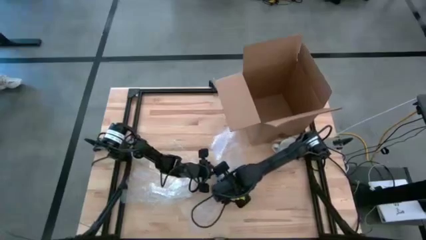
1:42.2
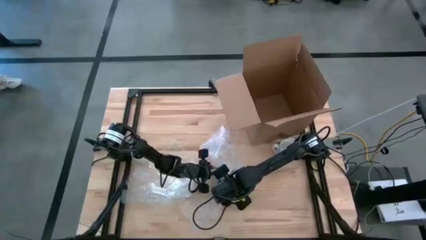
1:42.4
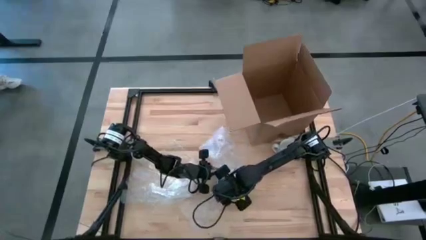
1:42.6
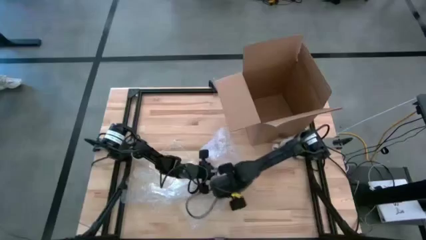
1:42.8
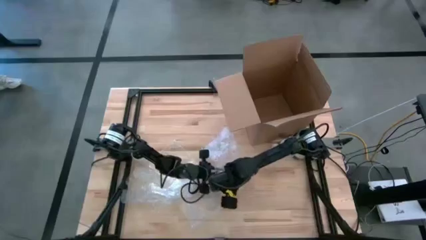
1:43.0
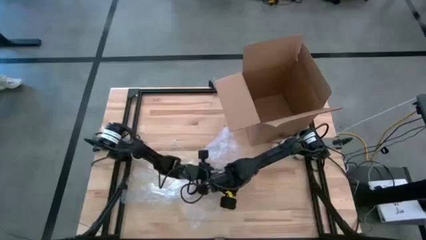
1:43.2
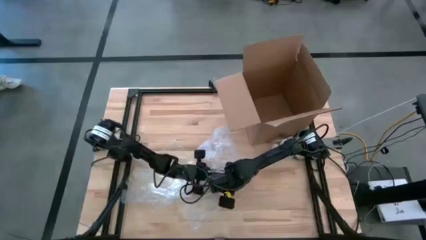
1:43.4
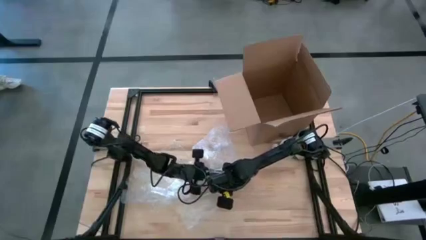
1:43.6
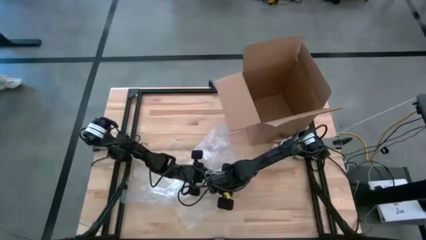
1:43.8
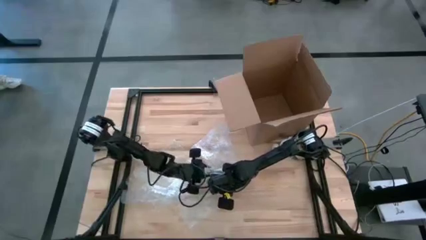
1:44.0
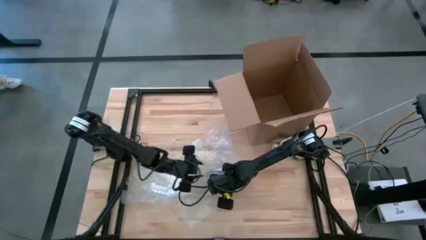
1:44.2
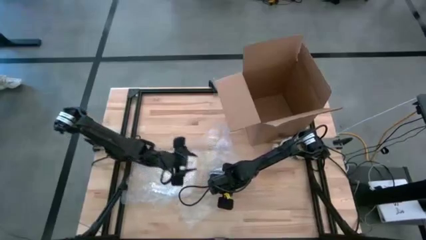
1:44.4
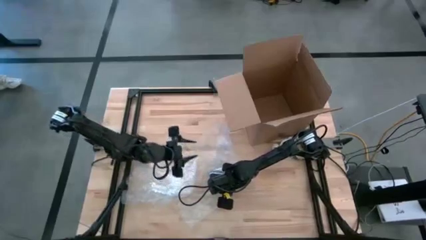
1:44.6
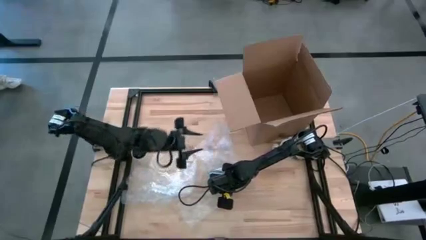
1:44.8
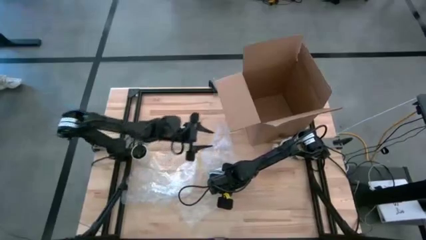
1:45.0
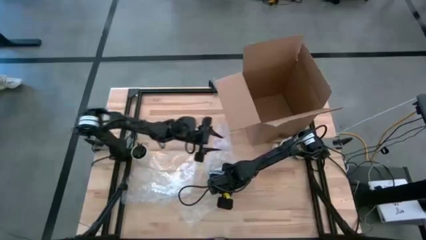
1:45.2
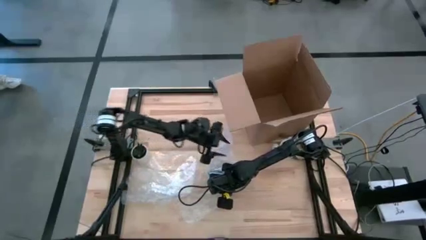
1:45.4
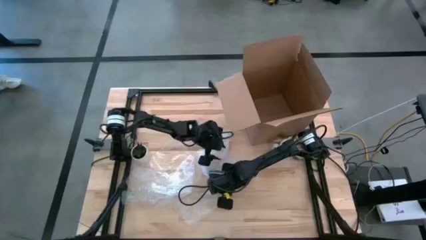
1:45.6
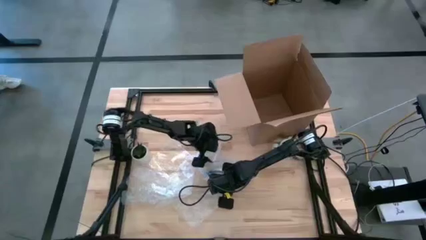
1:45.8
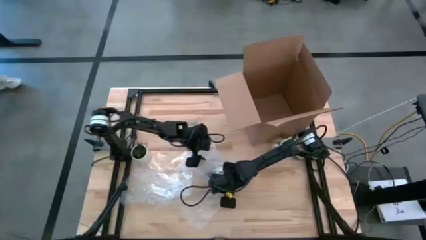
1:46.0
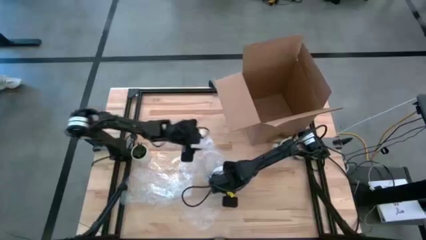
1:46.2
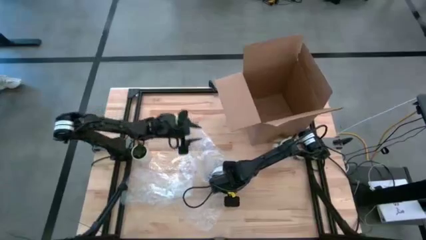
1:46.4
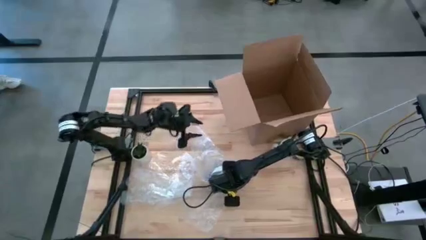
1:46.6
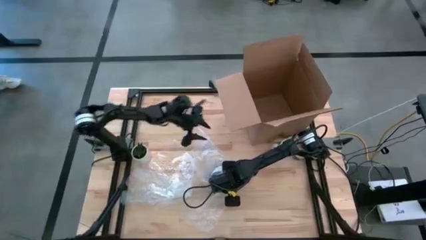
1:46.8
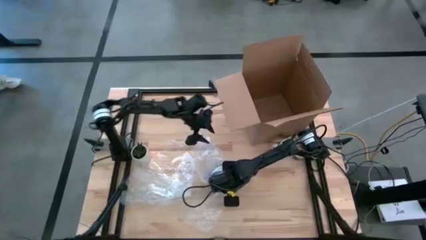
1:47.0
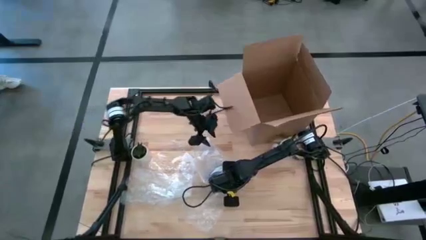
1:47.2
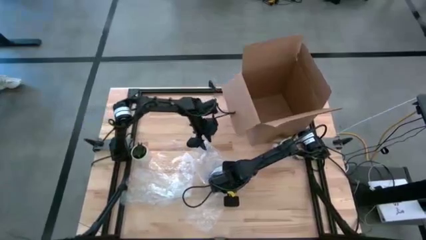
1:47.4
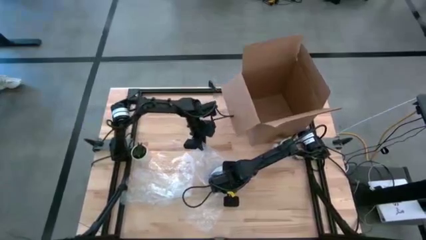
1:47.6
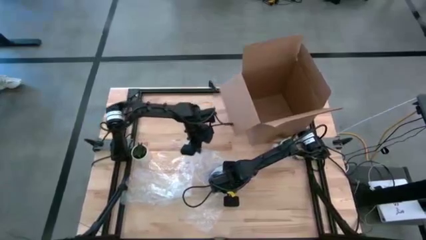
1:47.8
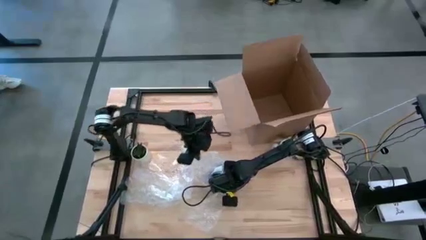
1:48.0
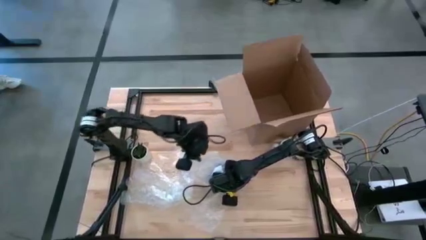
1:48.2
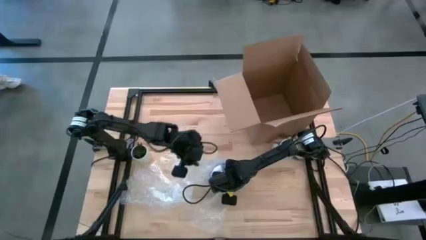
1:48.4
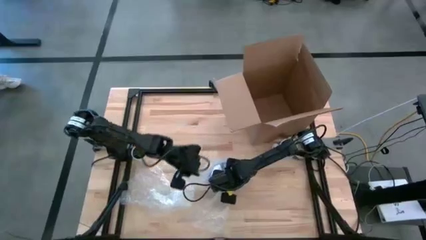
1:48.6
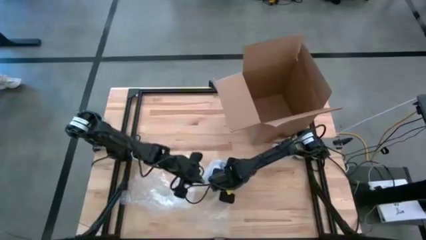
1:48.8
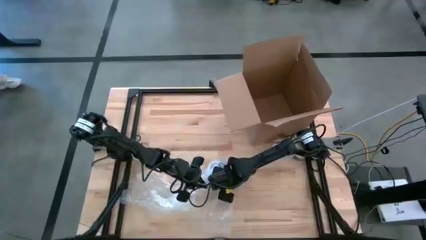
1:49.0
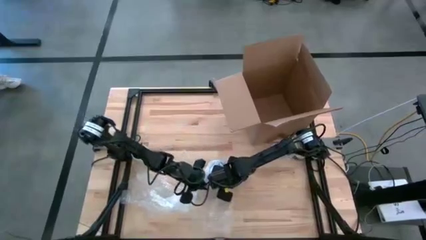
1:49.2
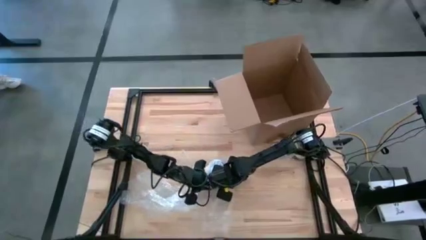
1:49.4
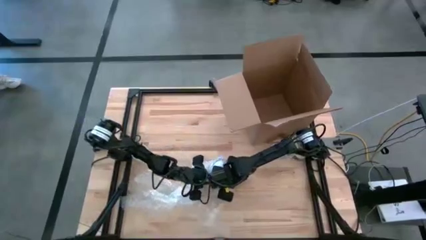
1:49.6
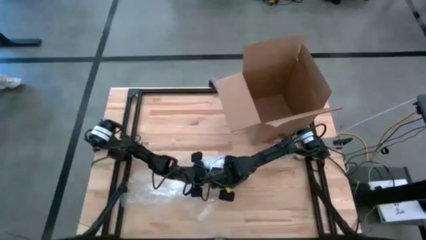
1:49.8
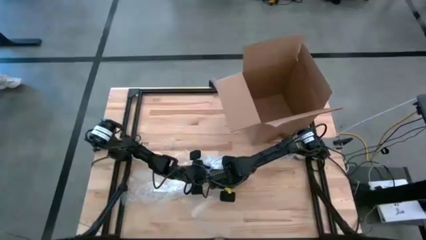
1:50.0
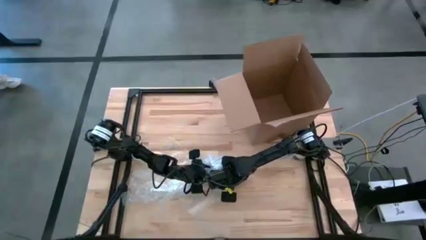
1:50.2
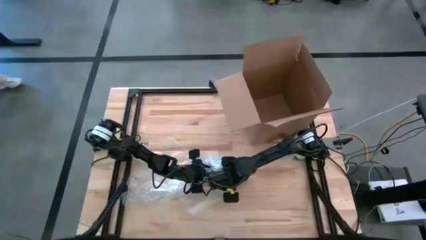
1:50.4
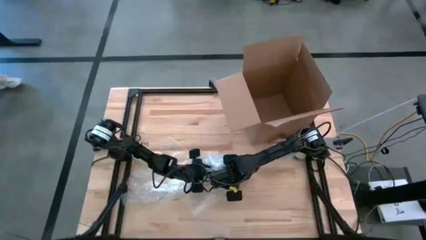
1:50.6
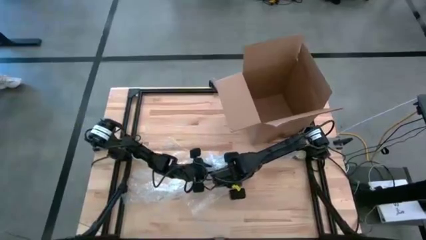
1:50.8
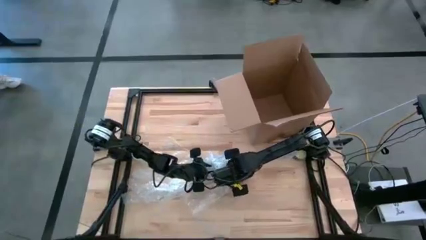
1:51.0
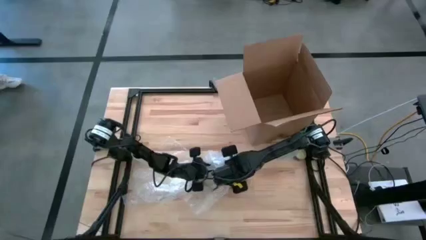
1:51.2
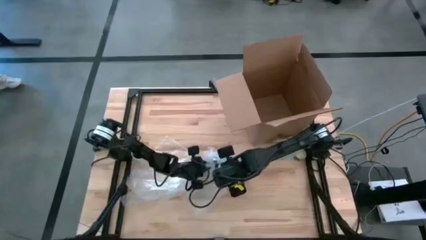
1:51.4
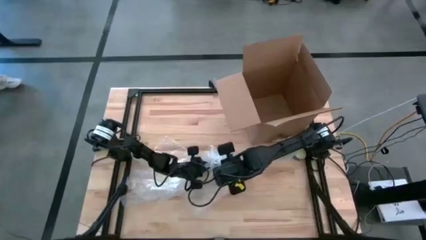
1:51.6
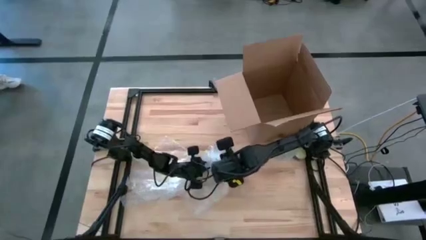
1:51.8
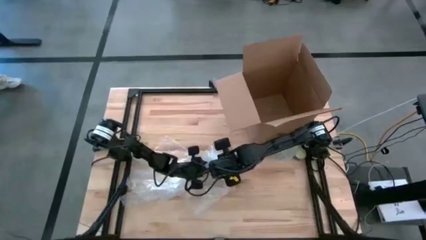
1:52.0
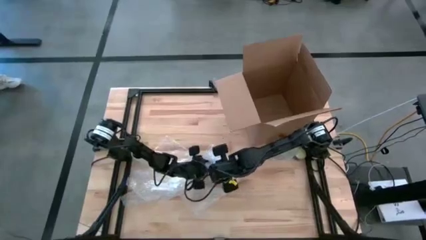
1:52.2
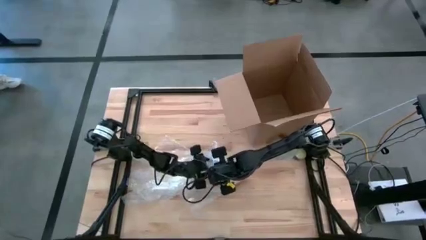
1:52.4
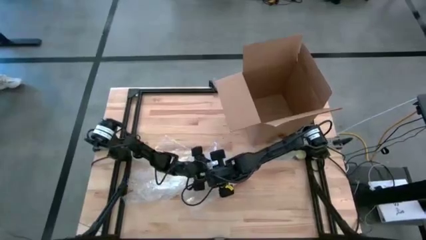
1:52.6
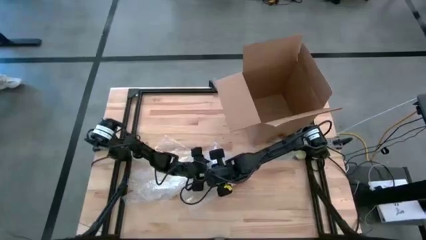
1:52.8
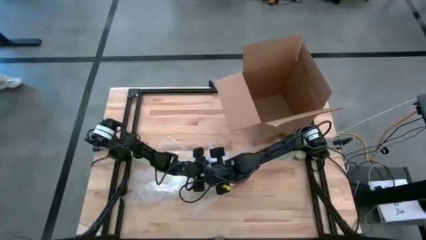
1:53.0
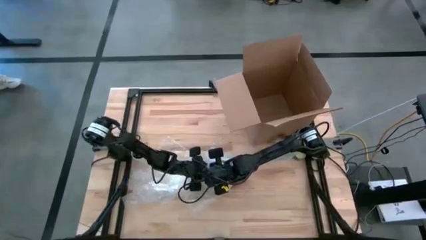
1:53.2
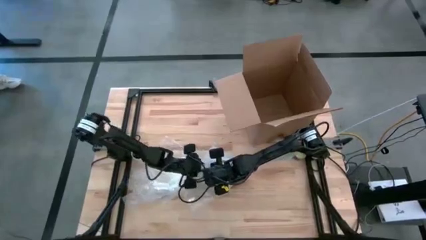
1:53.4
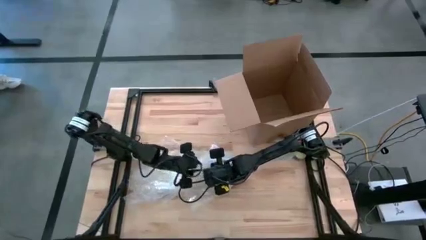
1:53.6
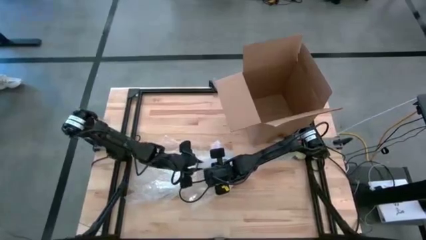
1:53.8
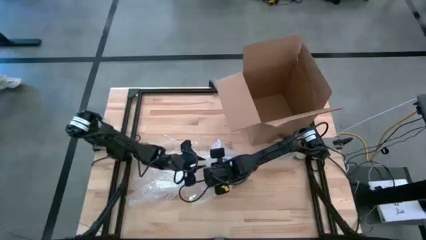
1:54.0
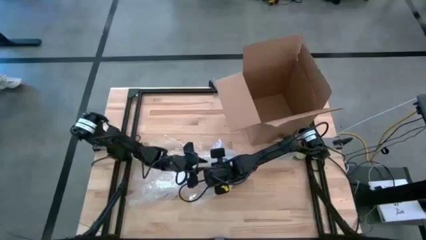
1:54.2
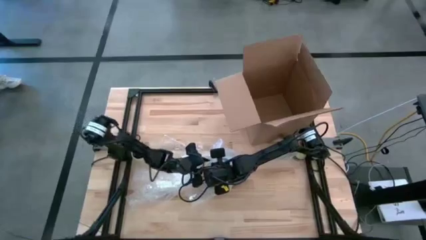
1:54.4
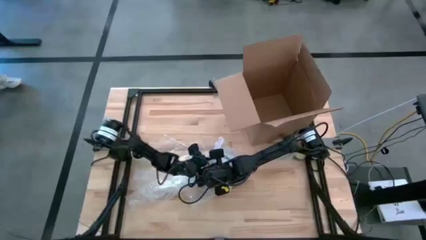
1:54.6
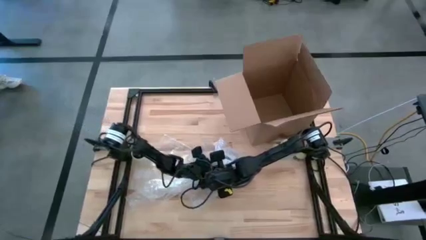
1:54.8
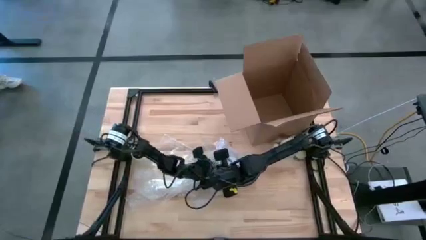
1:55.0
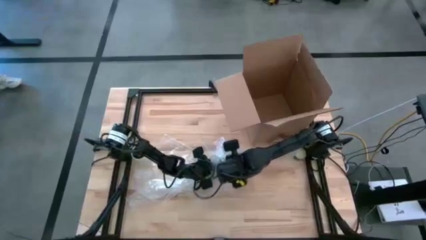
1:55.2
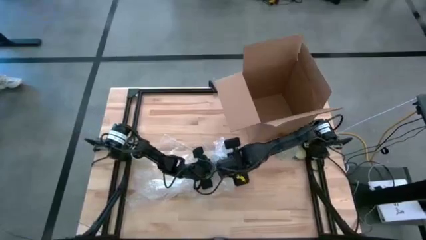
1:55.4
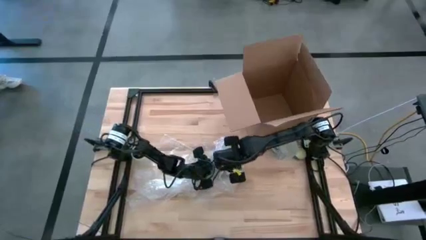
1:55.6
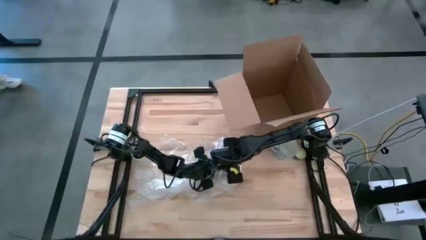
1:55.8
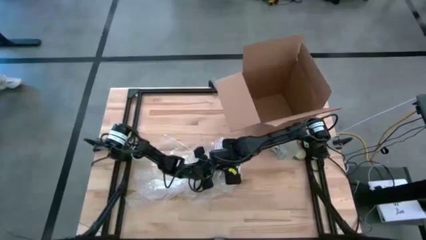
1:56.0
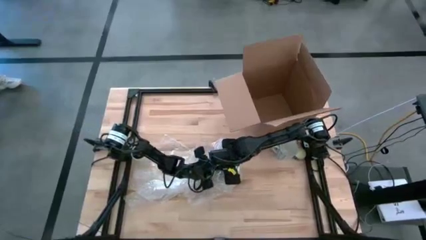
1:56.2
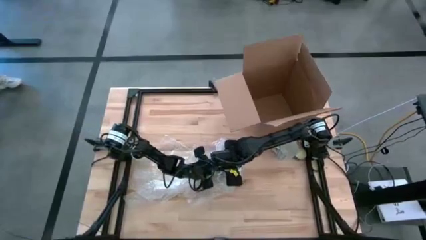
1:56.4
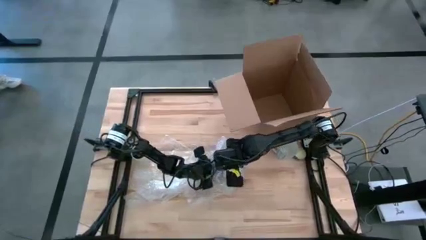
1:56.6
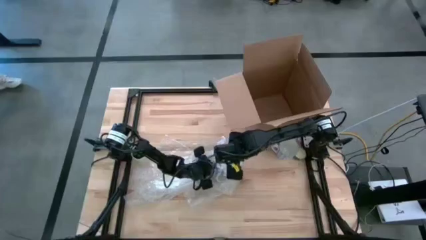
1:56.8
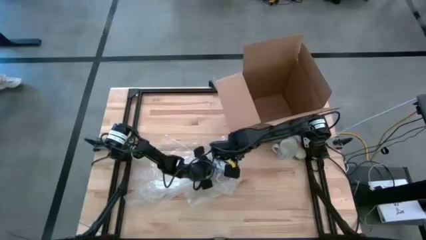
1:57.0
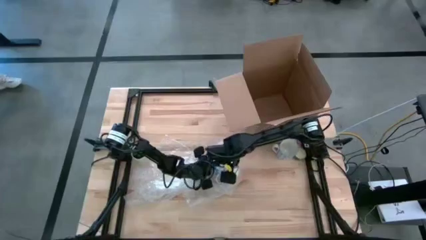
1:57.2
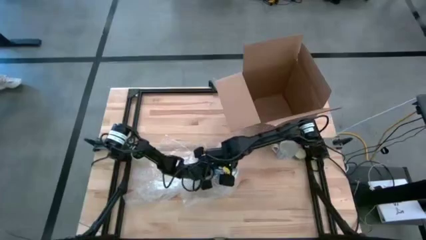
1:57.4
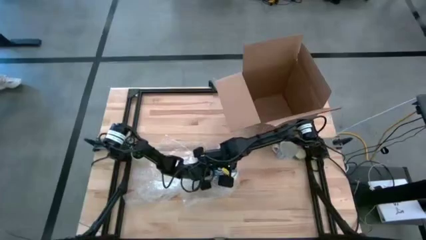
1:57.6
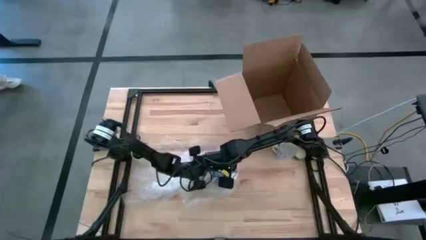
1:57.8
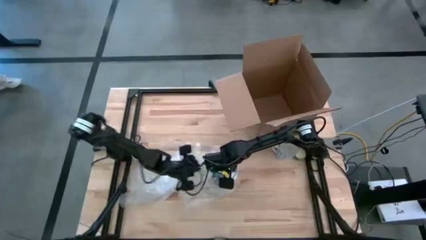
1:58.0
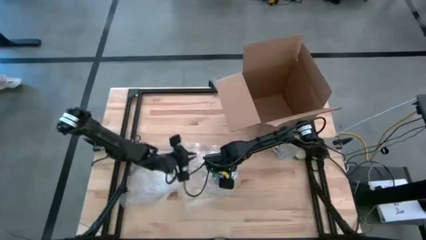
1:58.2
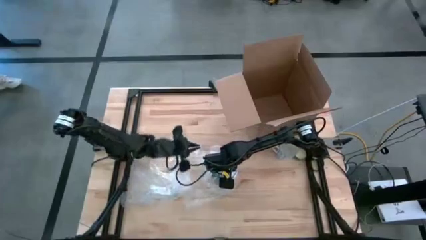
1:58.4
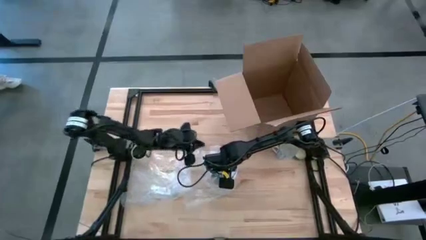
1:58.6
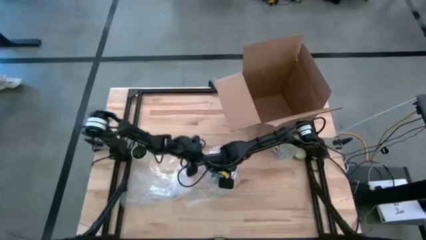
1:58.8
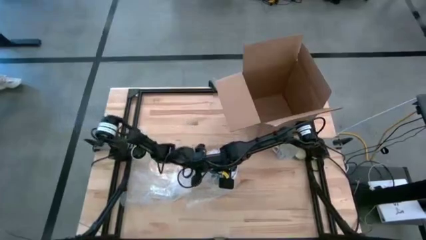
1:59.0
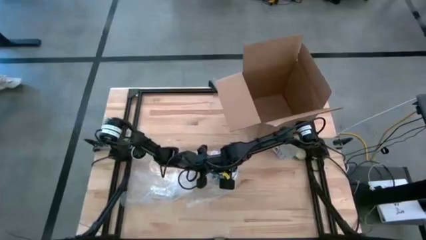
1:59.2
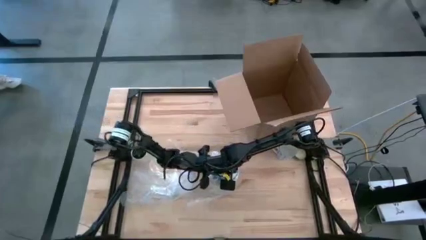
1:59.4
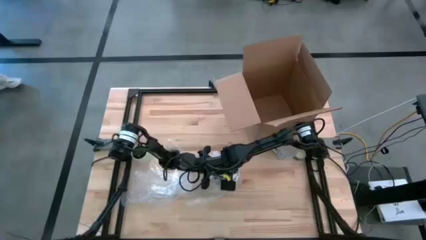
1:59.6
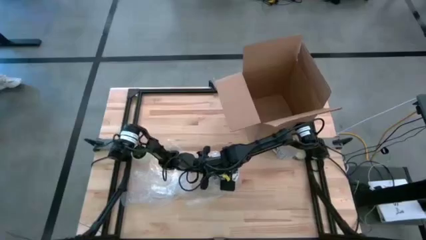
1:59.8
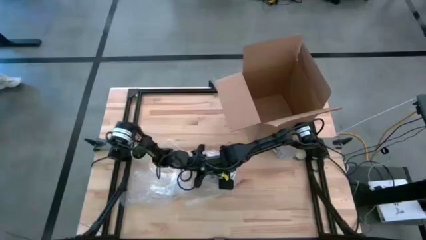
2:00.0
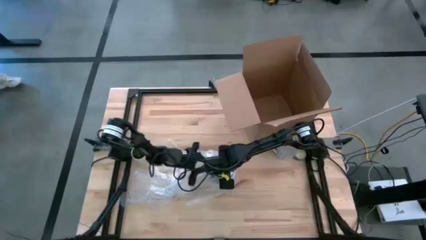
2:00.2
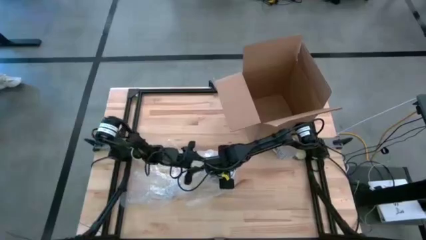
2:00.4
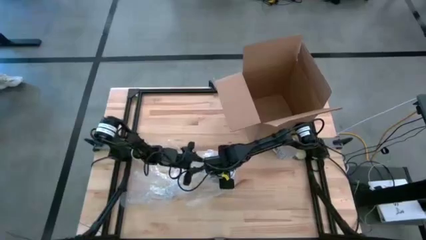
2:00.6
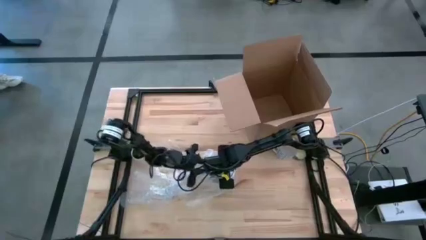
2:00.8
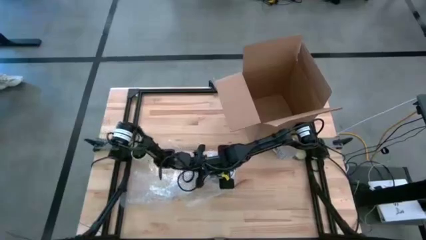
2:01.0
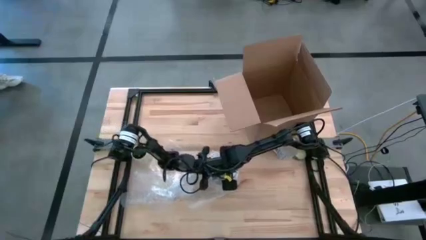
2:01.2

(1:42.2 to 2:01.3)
Task: wrap mug
Wrap the blue mug with the right bubble wrap
